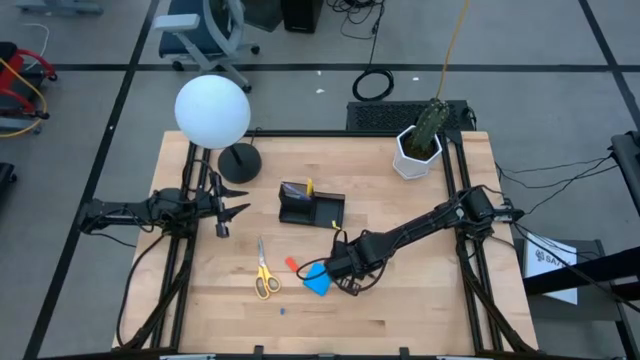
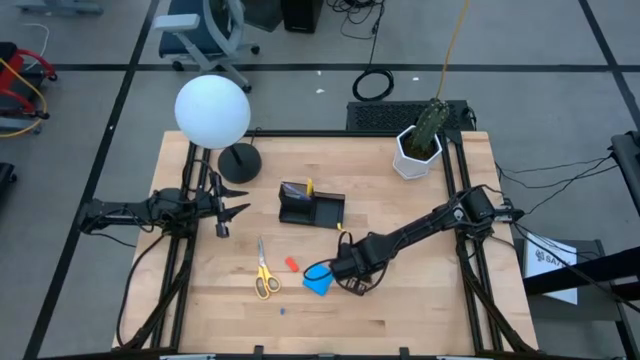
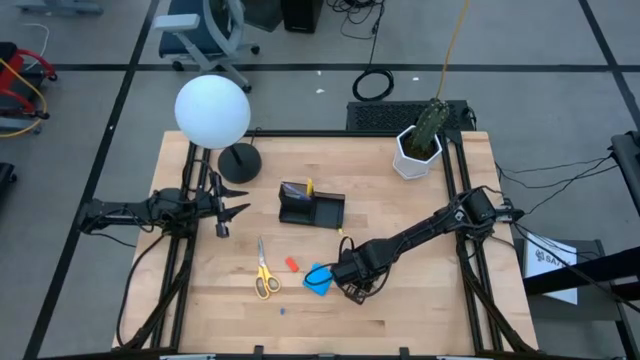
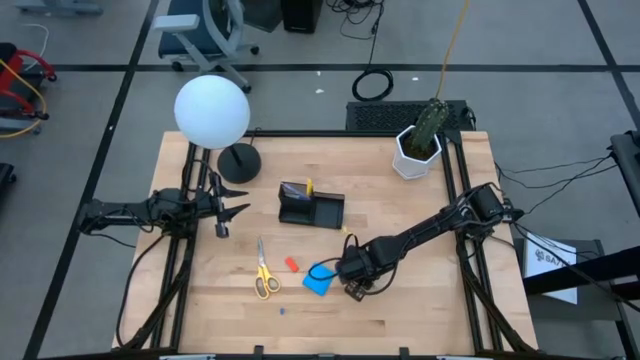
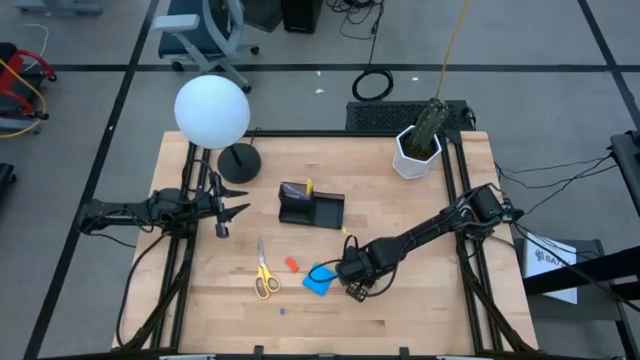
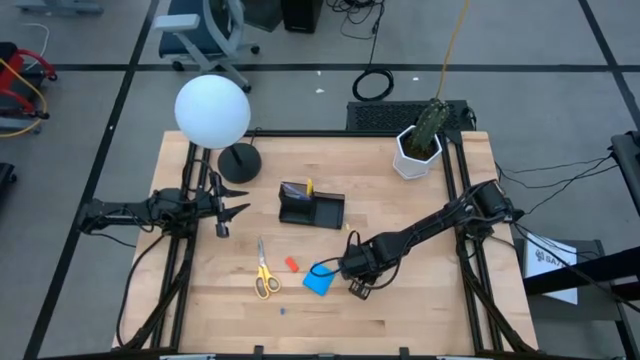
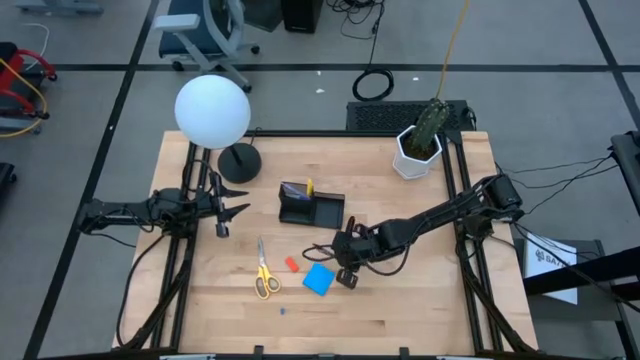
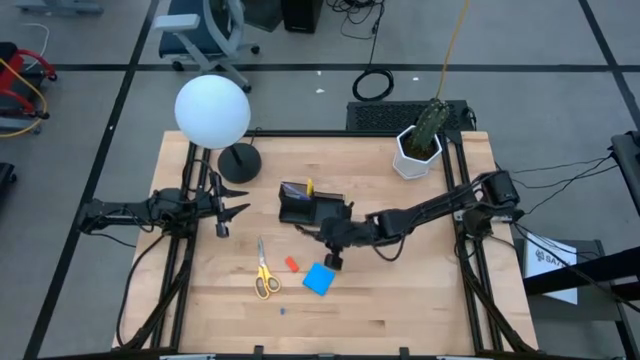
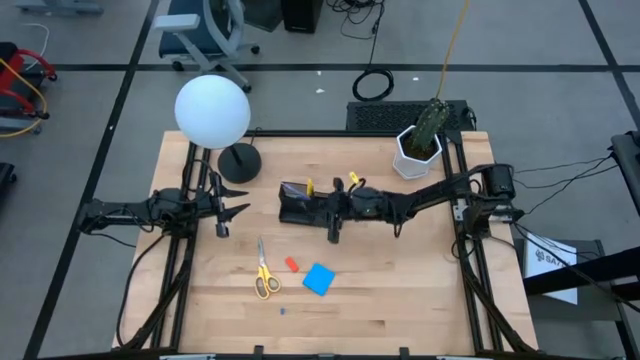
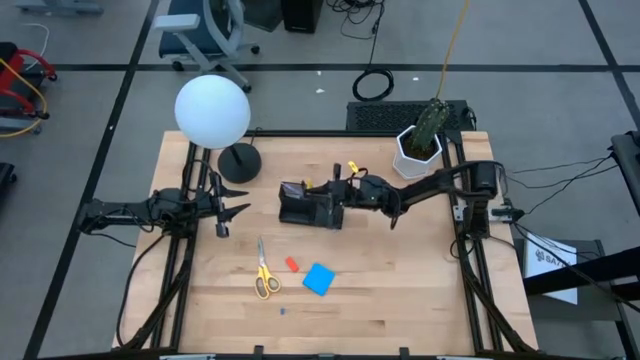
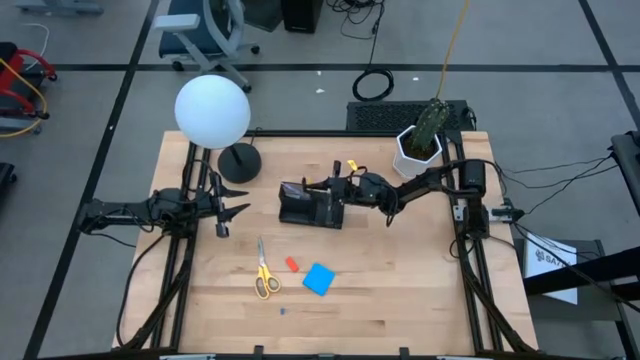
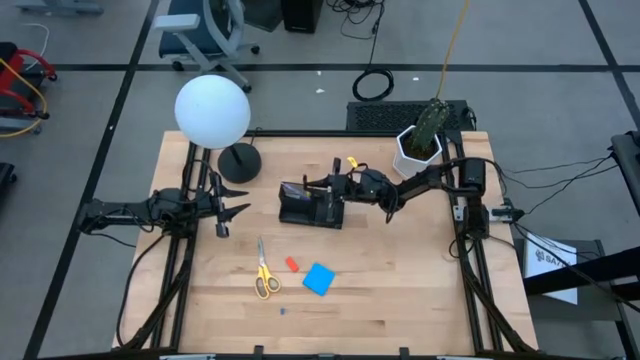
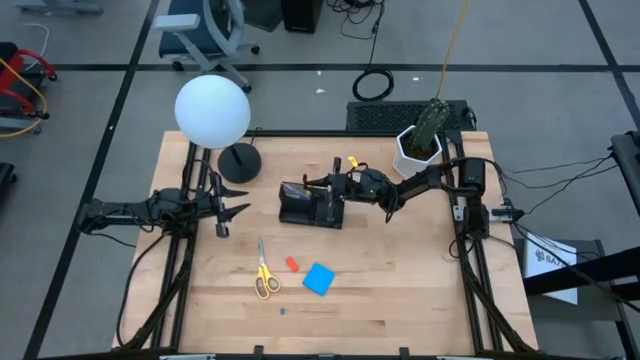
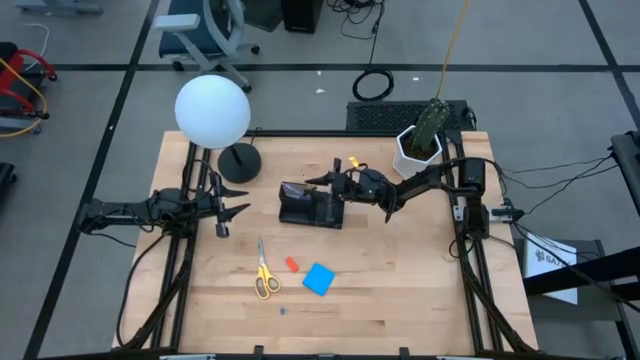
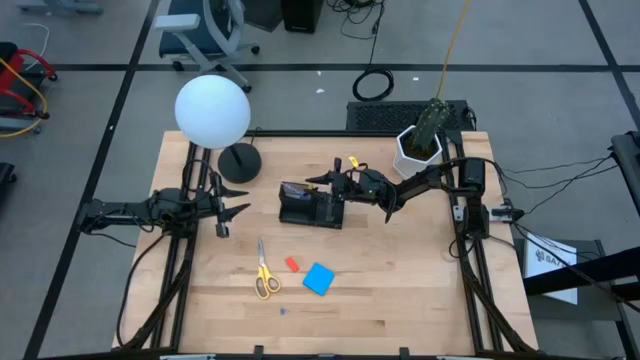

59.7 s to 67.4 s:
Task: Pick and place office supplies into organizer
Put the black pen into the desk organizer

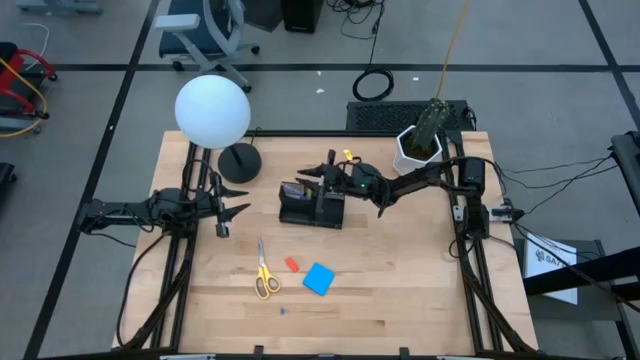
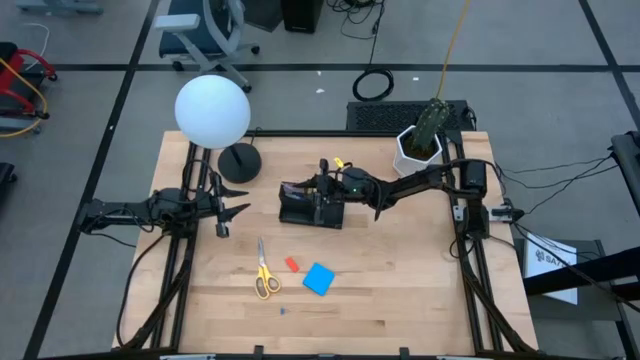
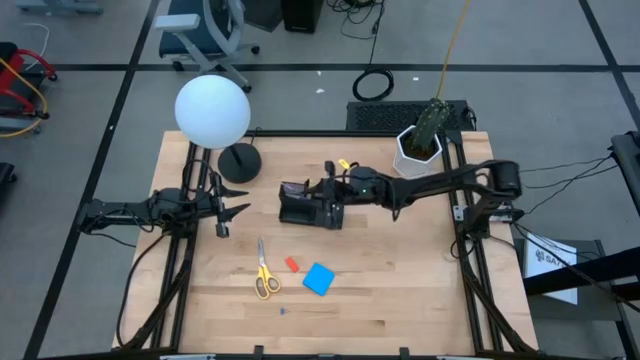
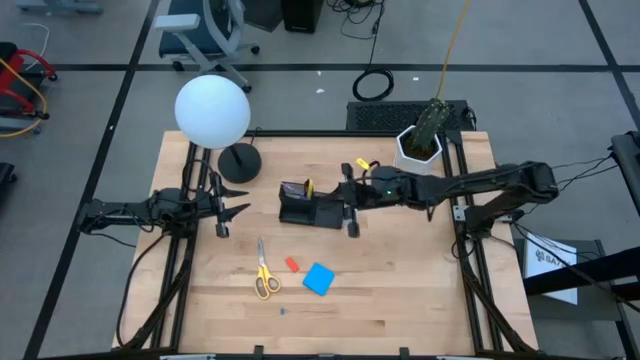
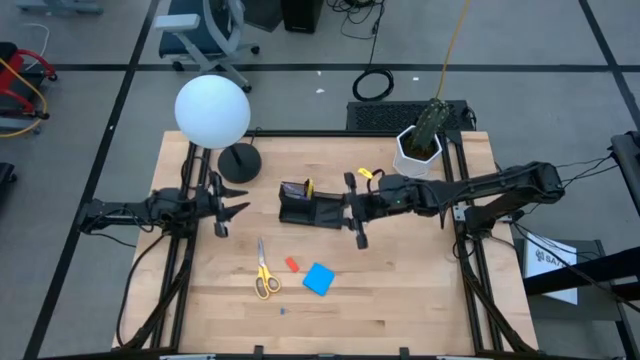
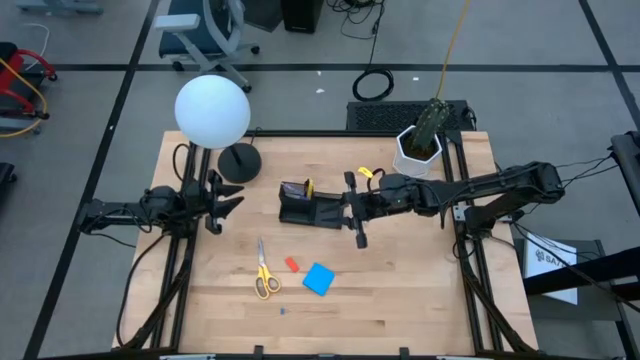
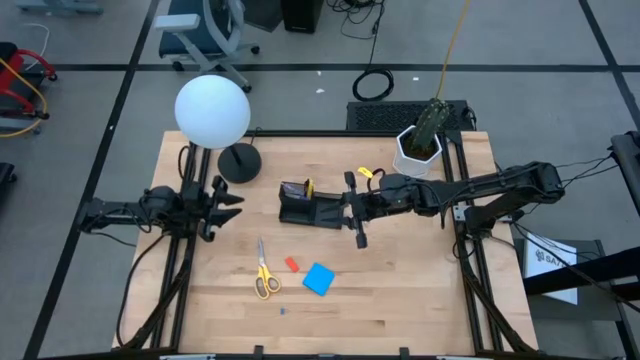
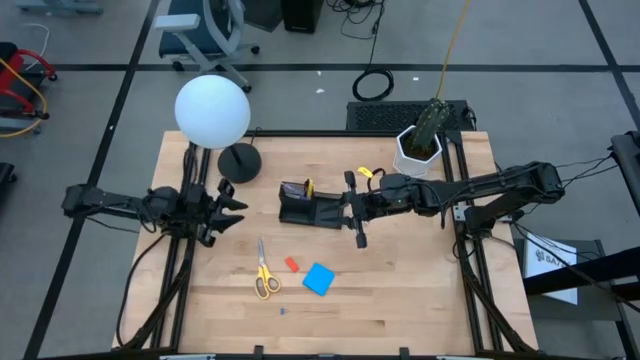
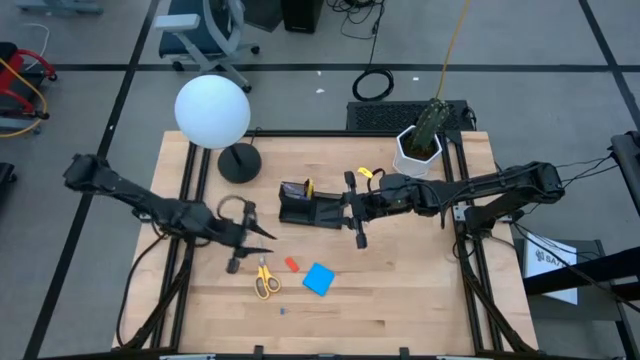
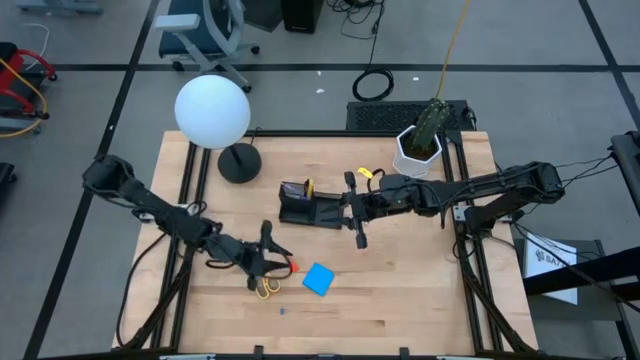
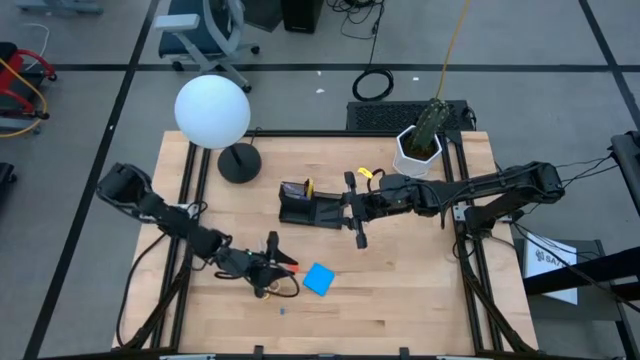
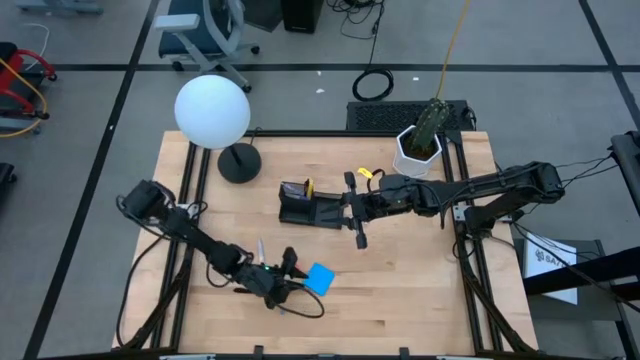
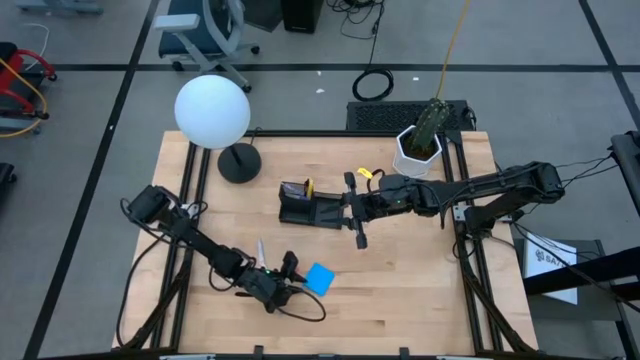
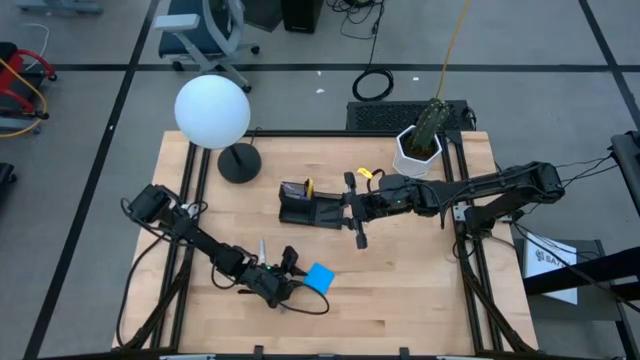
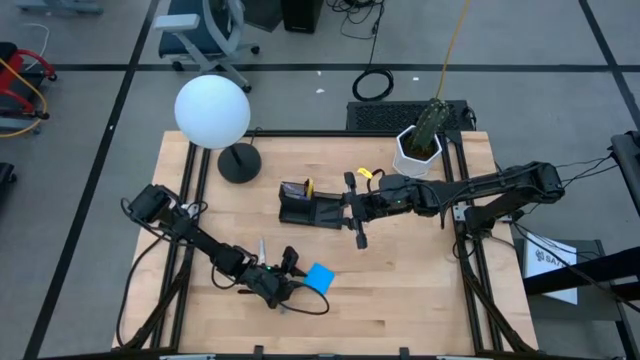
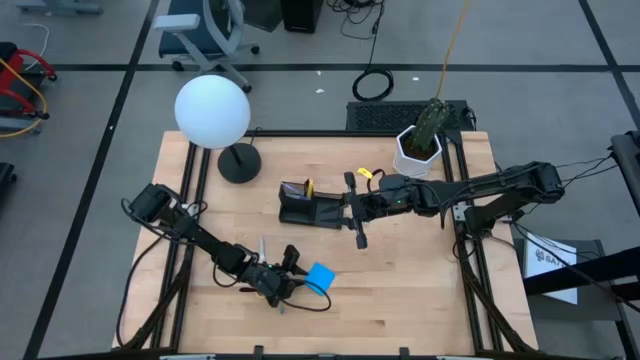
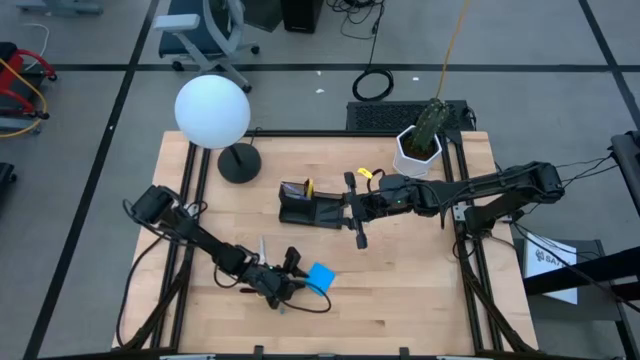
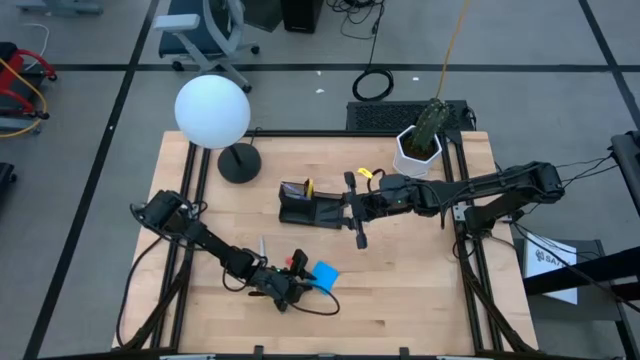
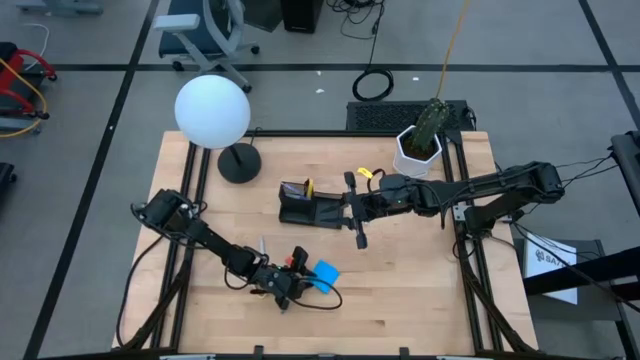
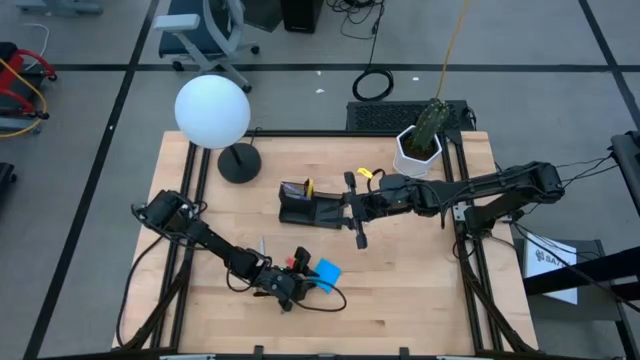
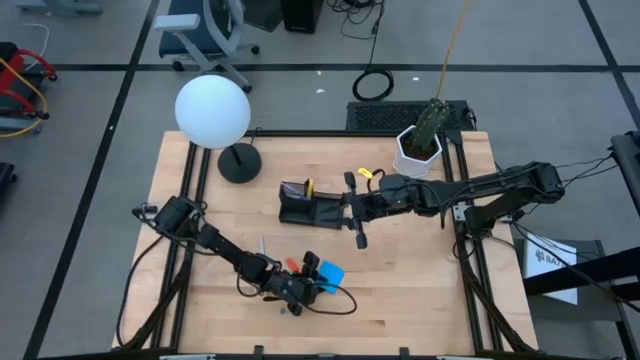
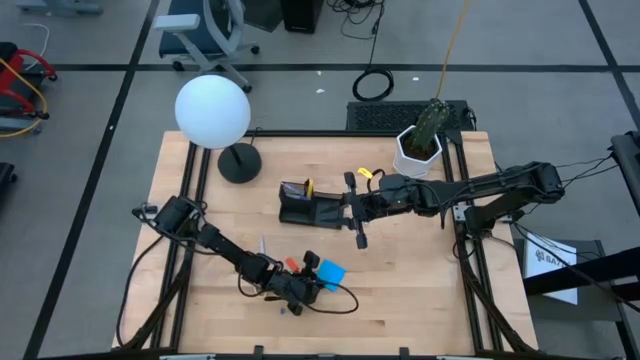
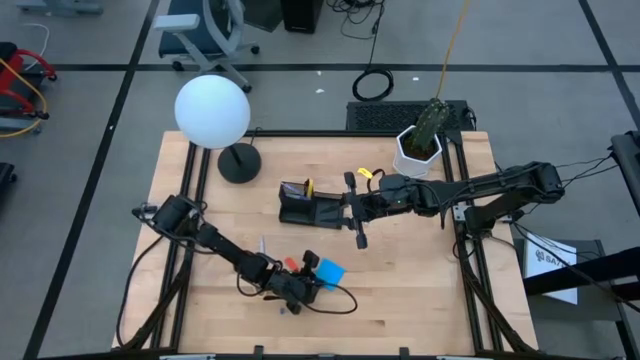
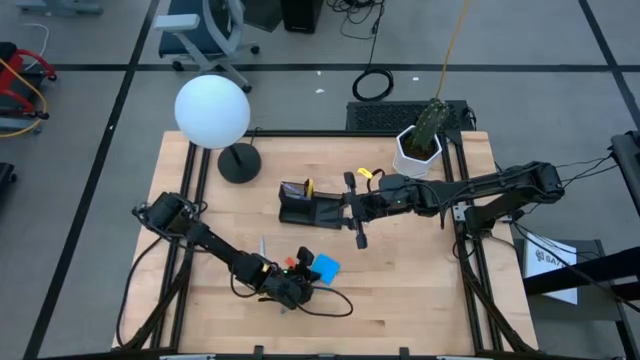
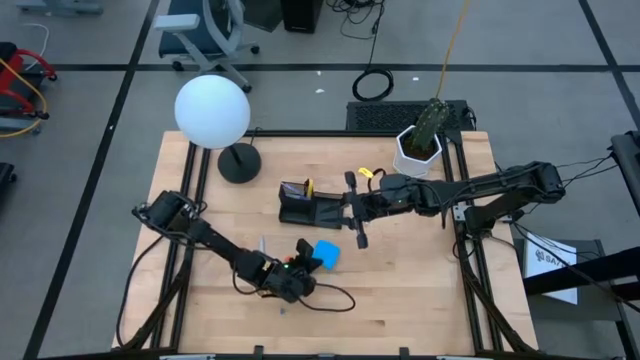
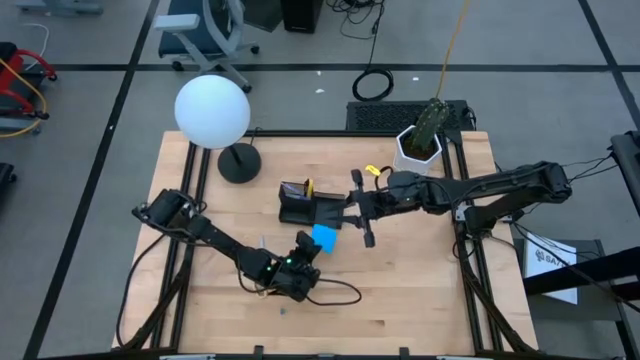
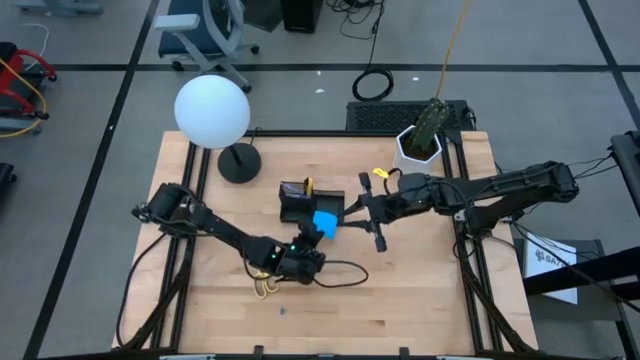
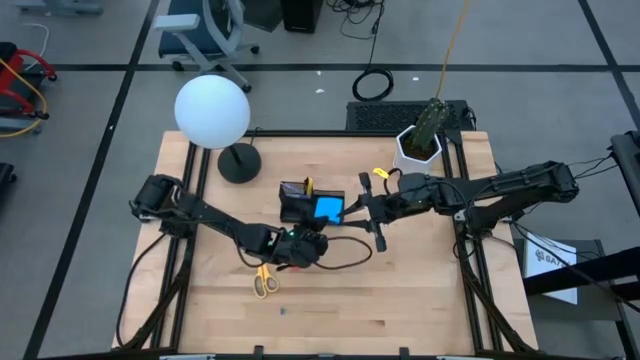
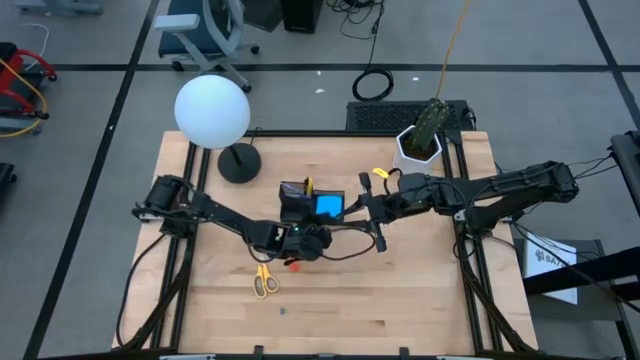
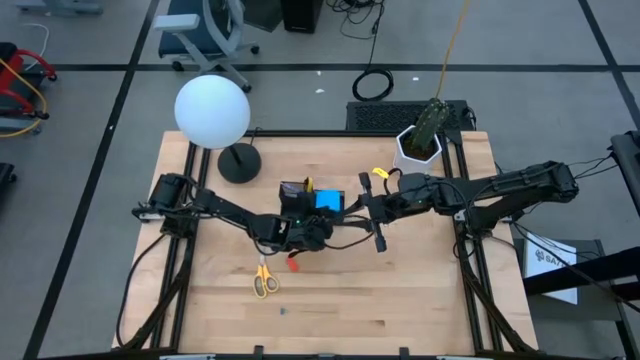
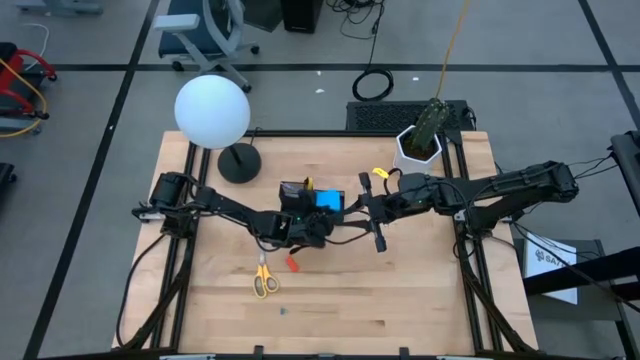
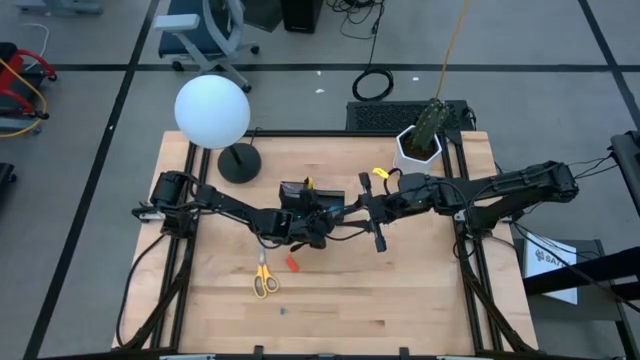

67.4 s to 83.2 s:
Put the blue sticky notes into the desk organizer
